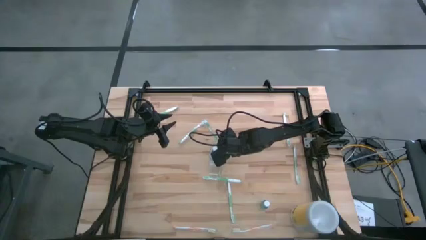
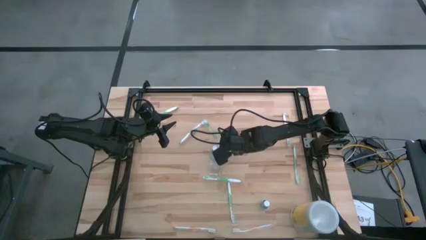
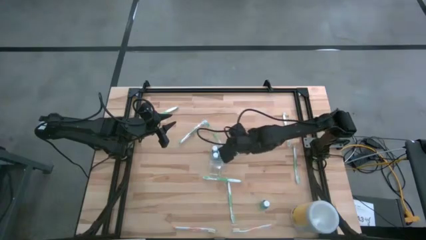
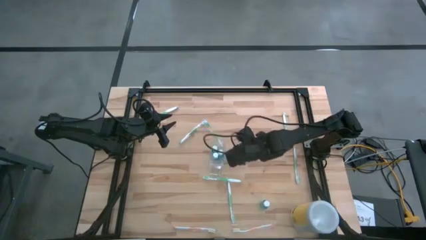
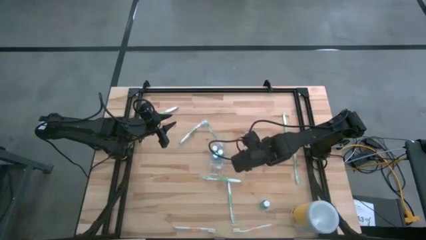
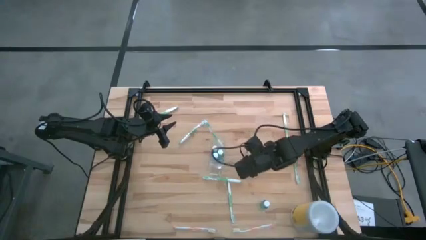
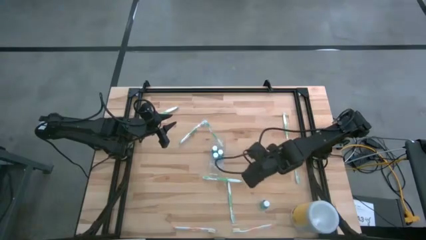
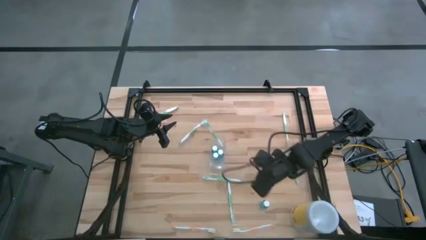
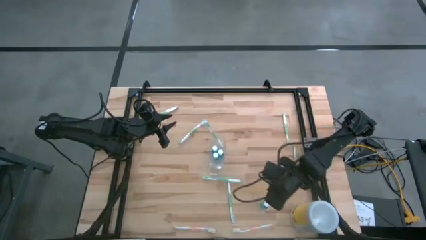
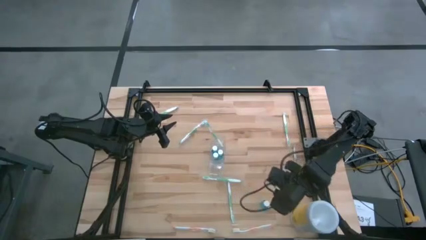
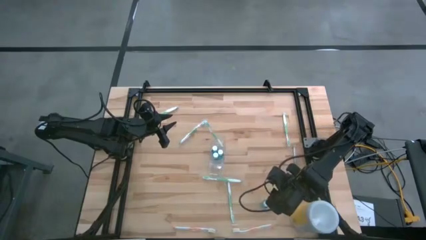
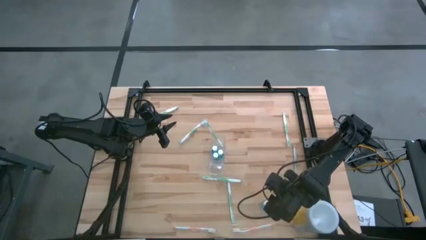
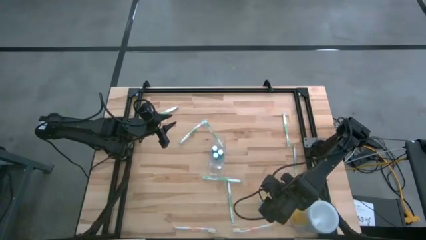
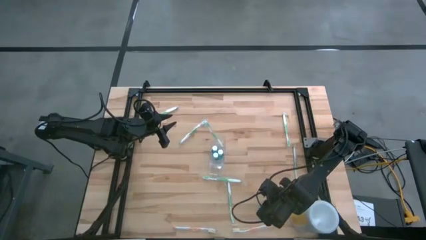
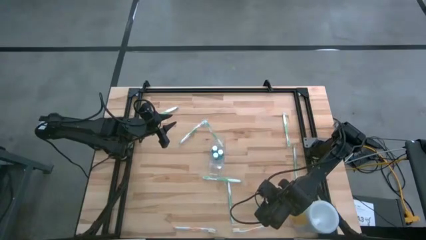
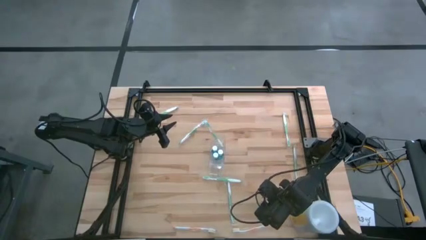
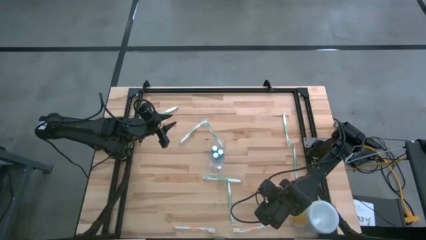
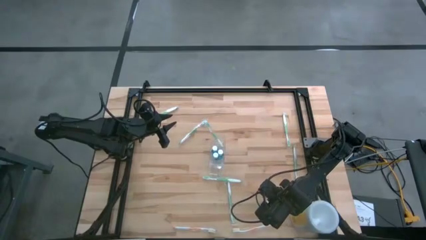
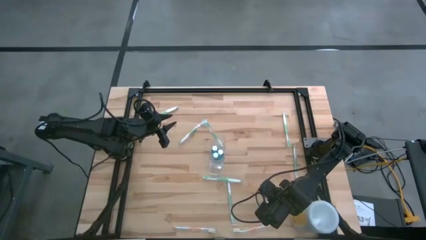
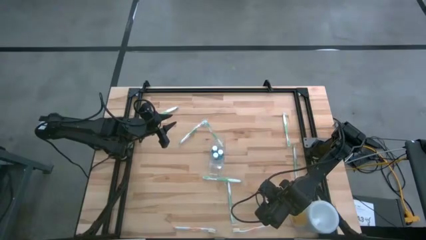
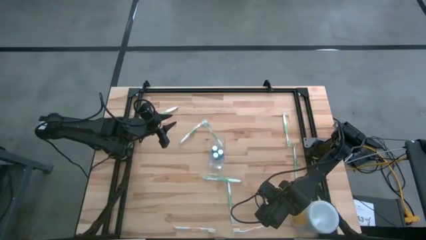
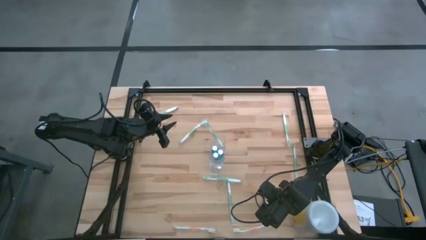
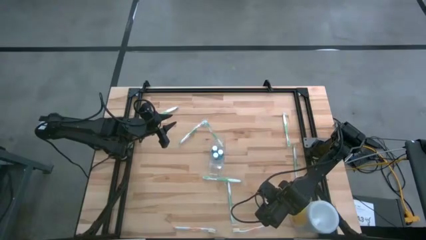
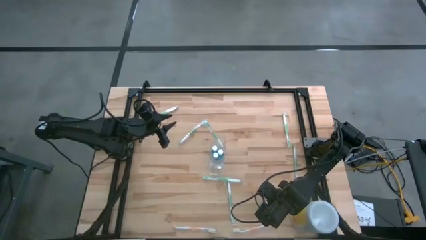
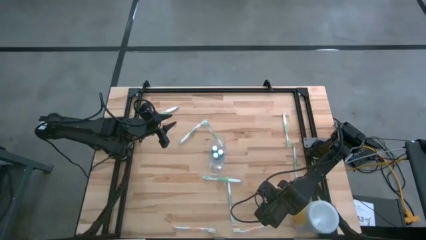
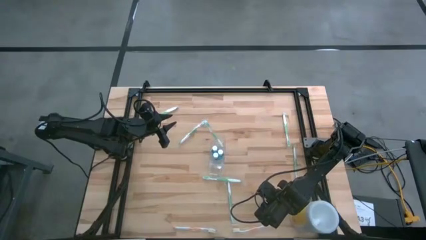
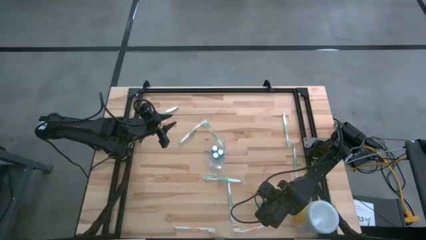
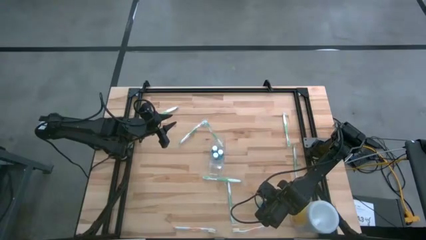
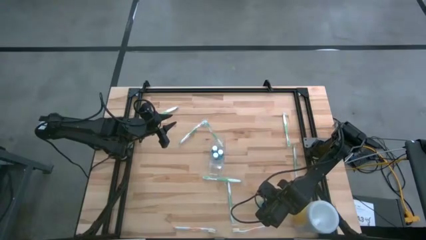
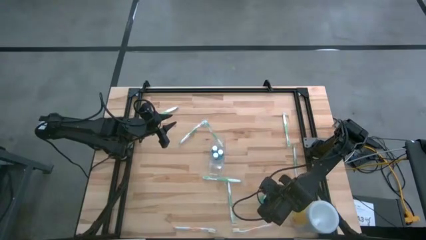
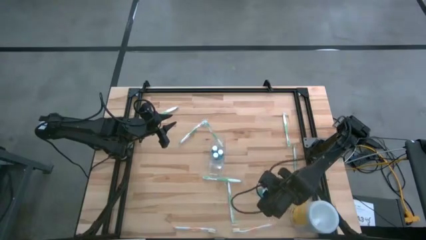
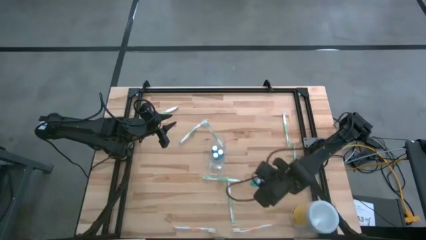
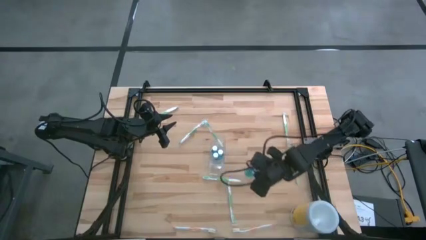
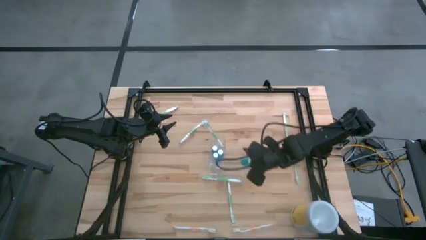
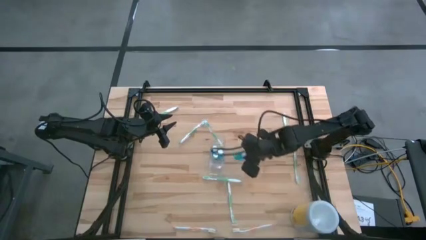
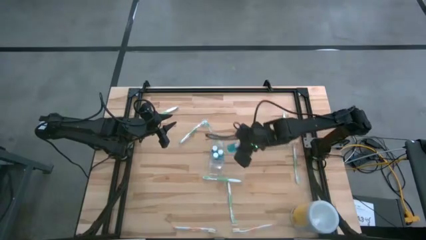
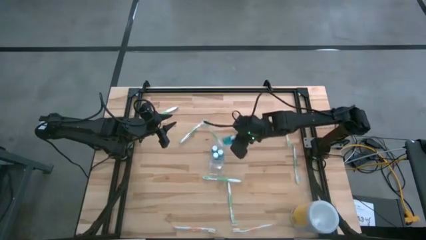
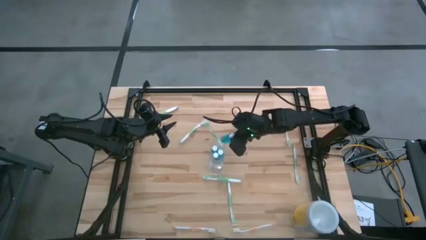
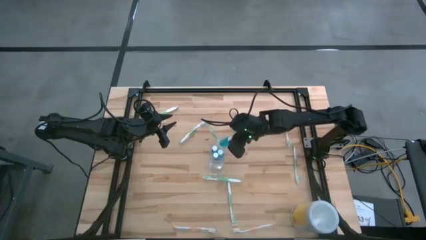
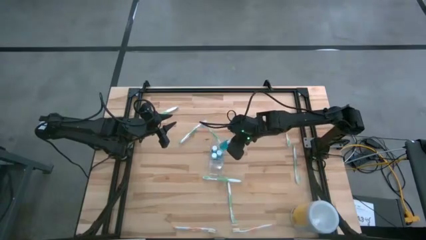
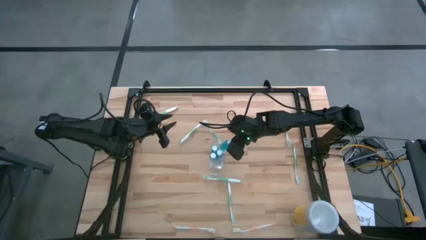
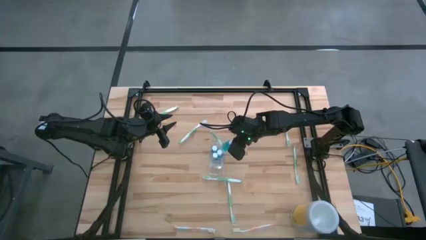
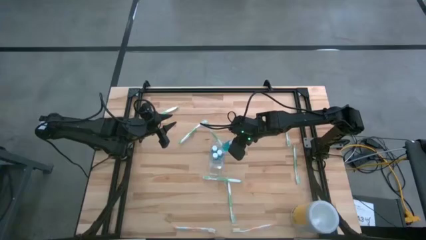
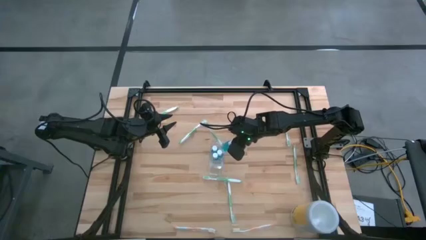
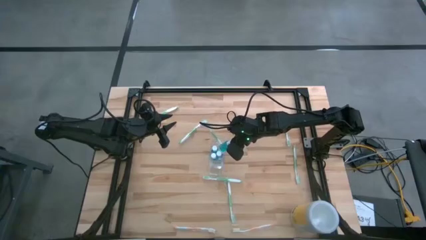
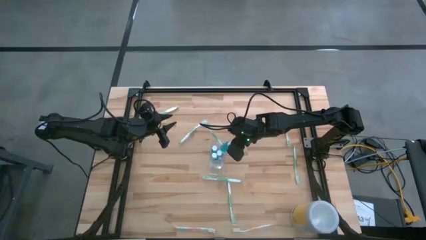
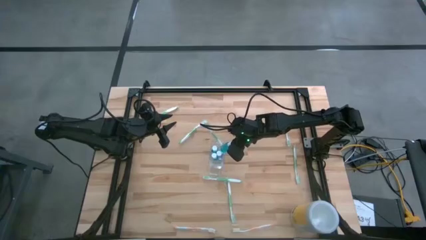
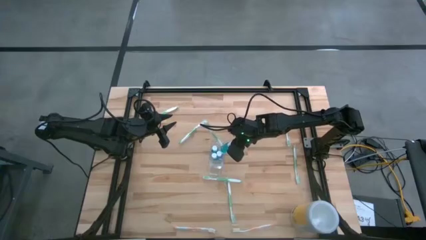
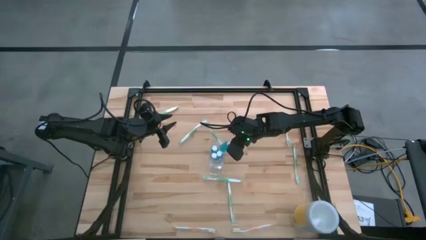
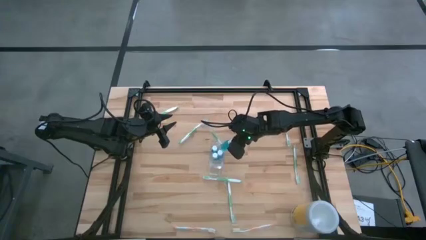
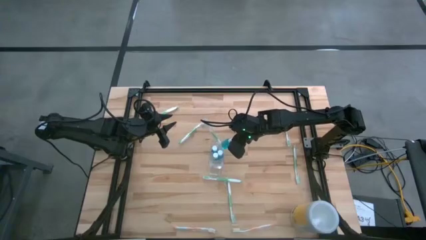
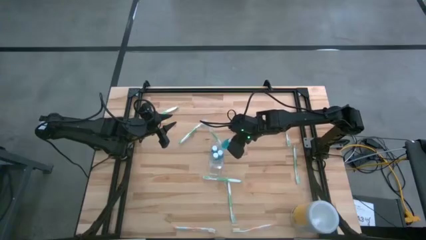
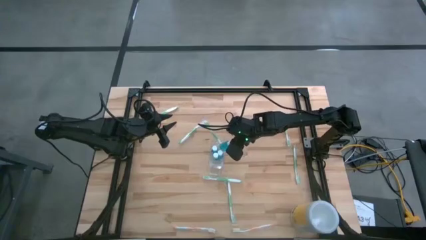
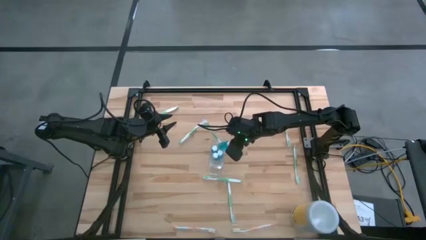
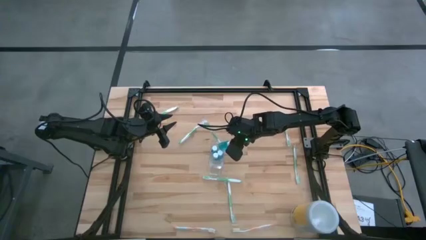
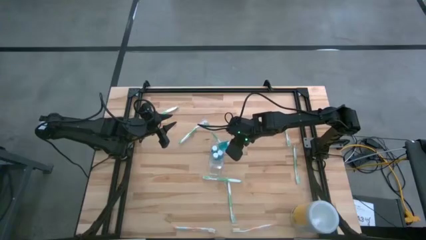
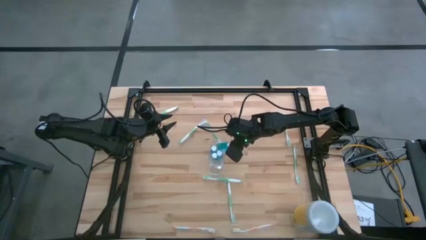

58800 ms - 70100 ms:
Task: Pick & Place toothbrushing station
Put the blue mouthwash bottle into the middle of the transparent organizer

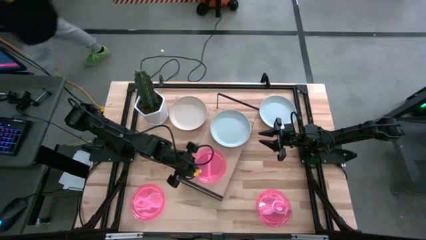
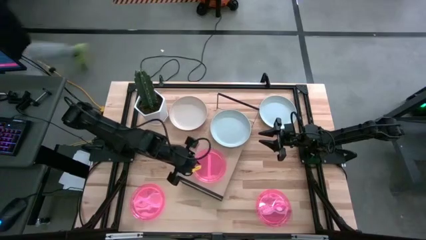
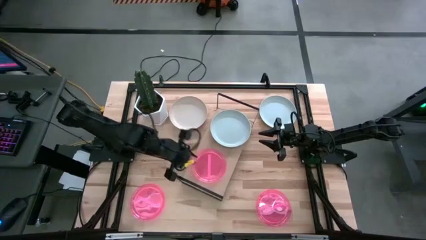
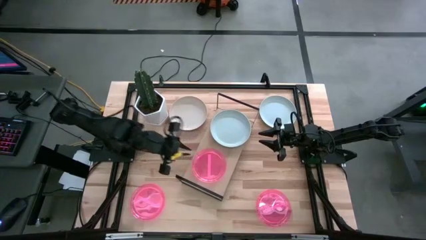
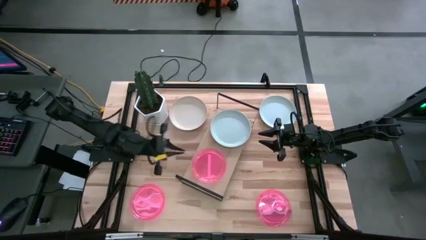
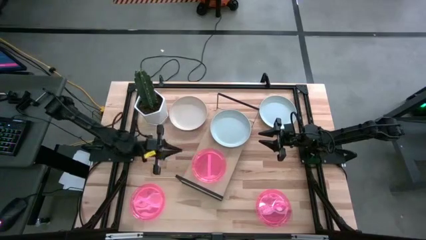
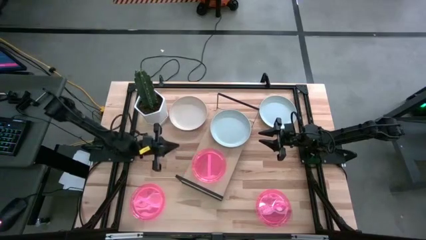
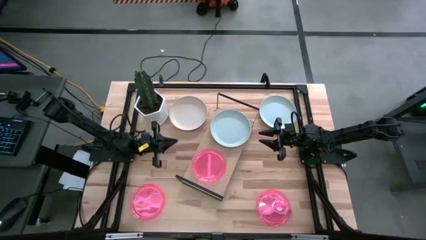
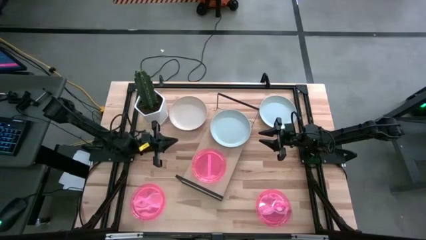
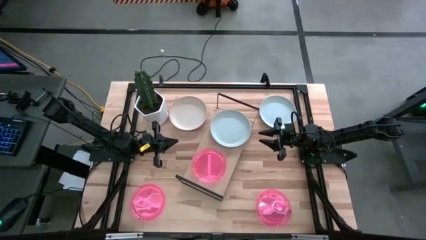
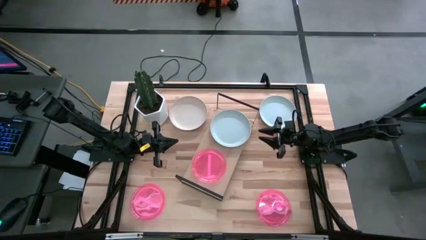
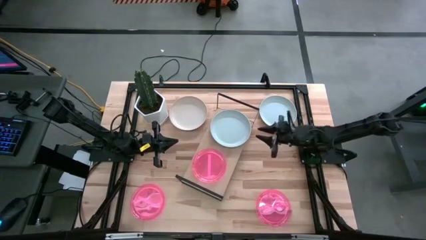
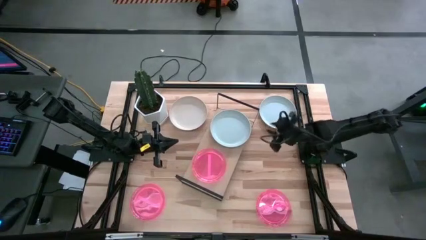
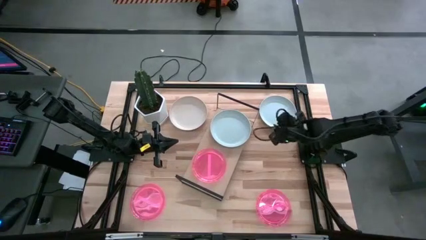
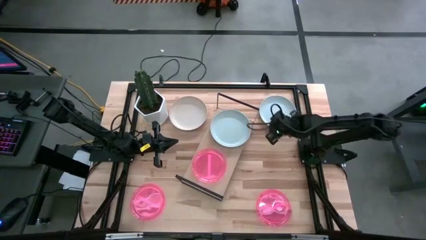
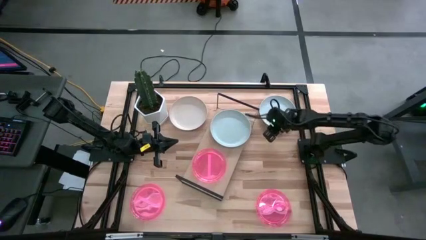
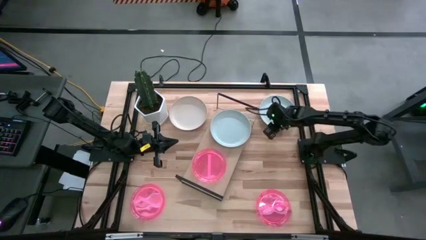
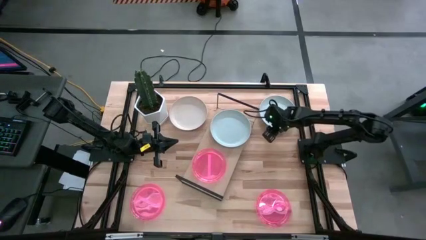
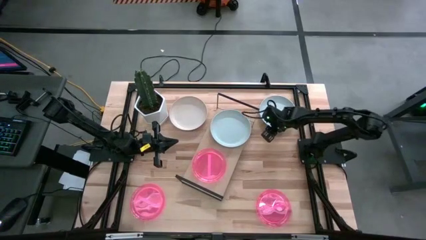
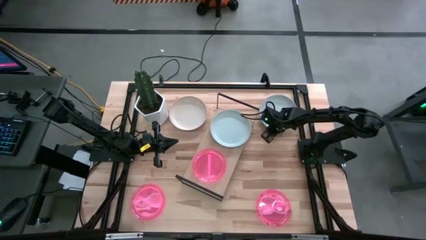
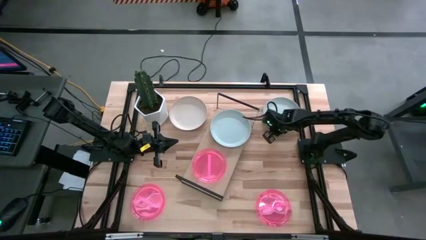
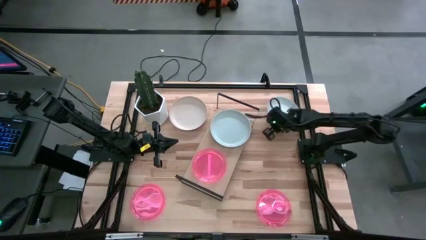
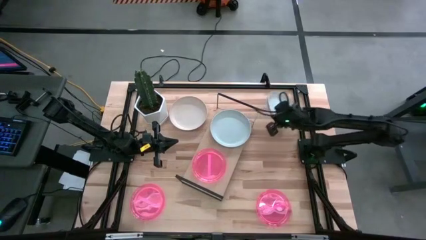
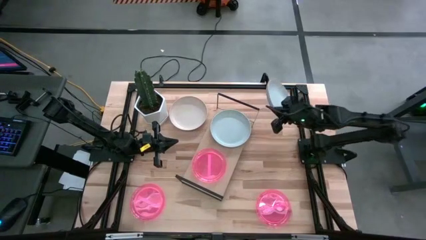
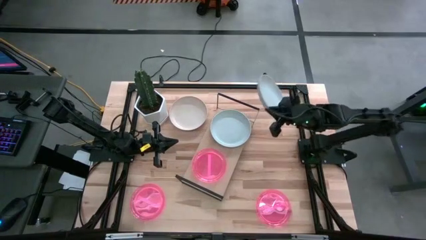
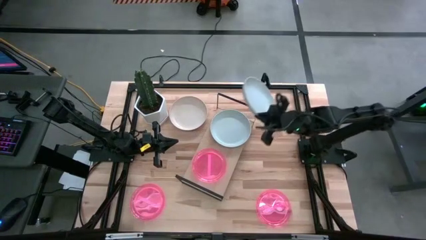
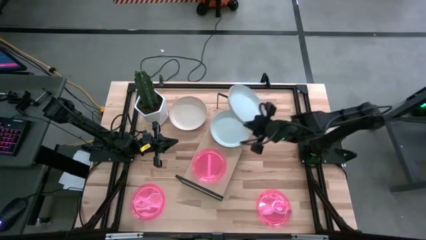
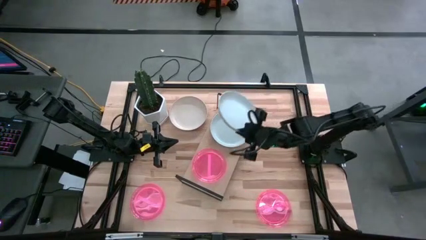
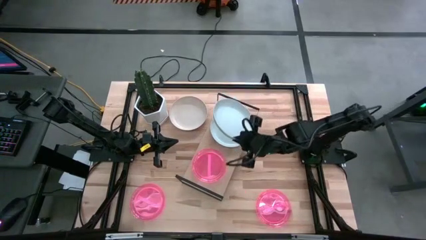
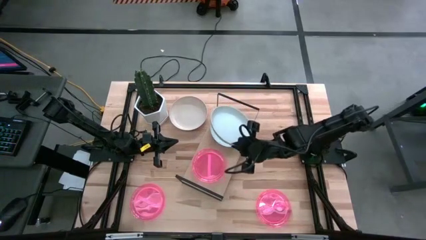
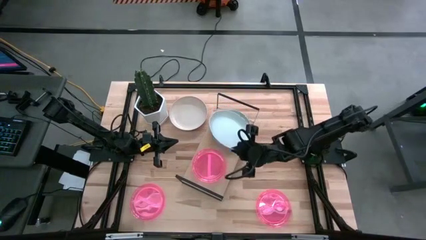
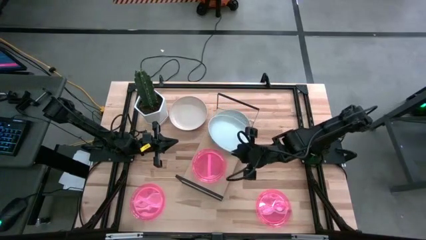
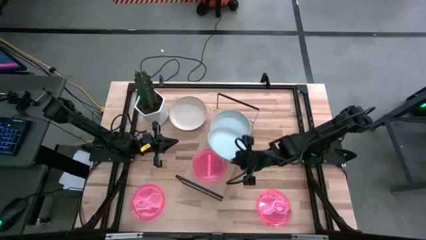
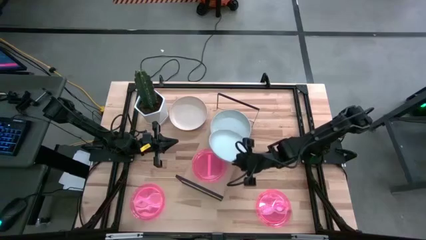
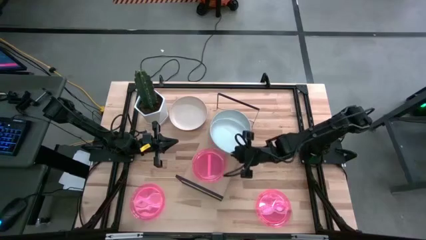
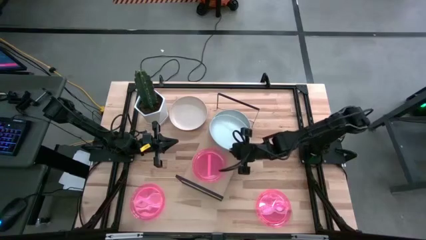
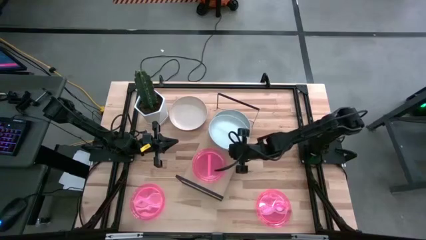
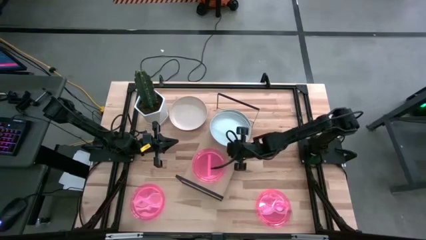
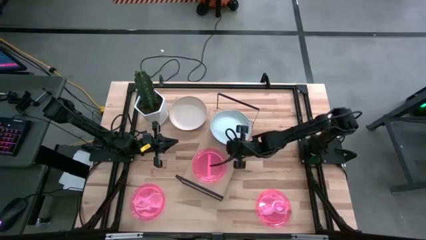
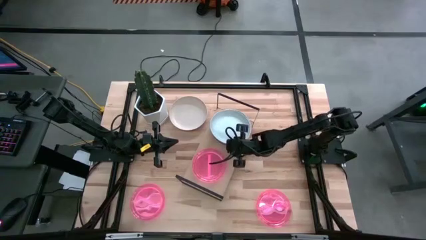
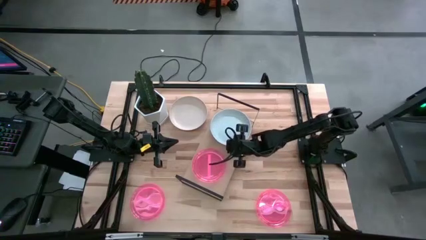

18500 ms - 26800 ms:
Task: Place and stack plates onto a shelf
Stack the right white plate on top of the other white plate on the shelf
